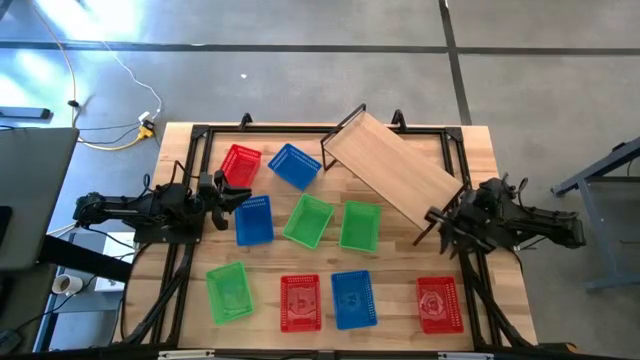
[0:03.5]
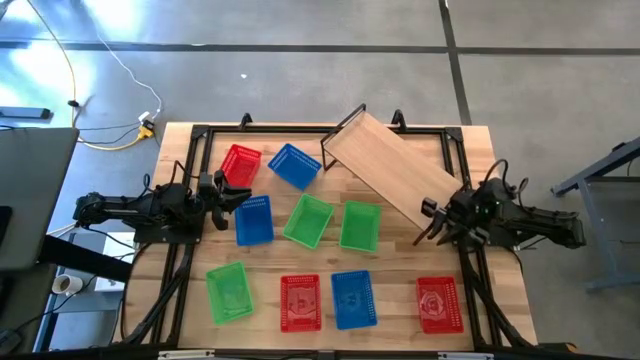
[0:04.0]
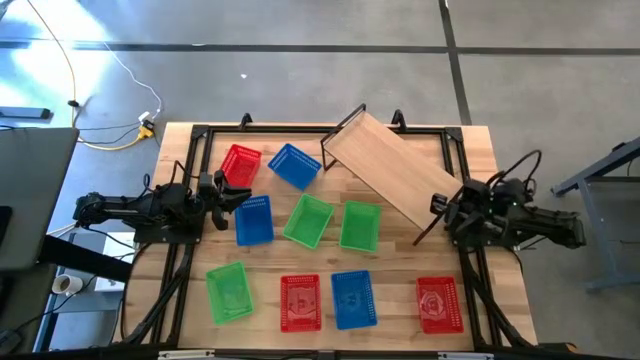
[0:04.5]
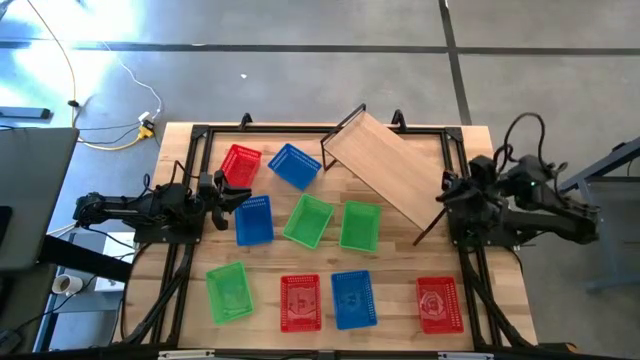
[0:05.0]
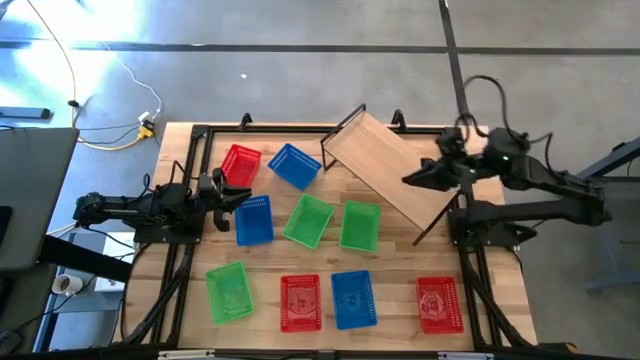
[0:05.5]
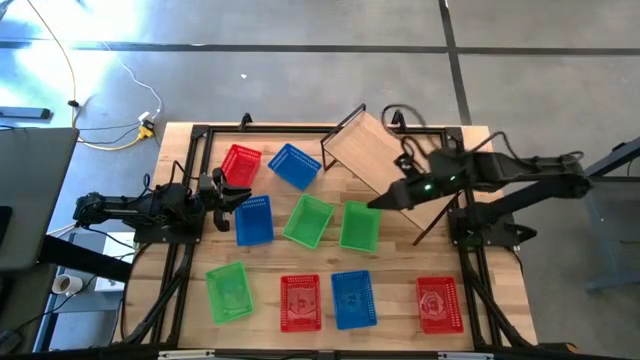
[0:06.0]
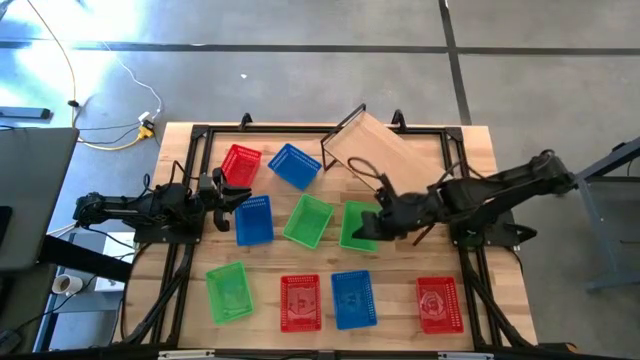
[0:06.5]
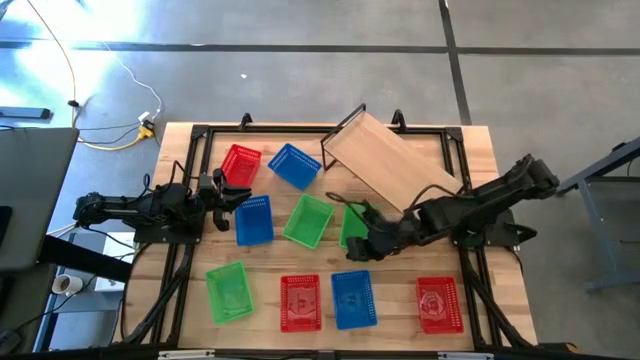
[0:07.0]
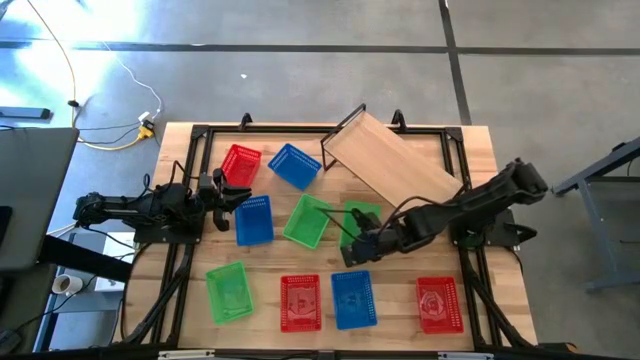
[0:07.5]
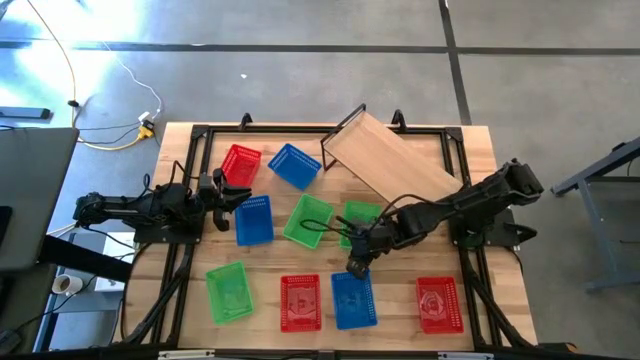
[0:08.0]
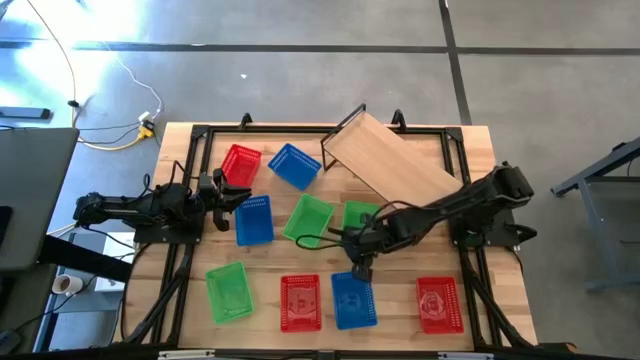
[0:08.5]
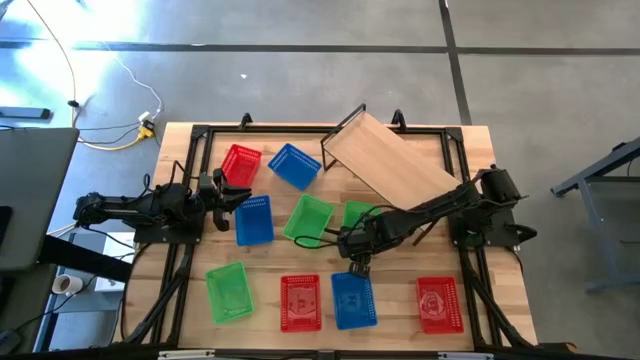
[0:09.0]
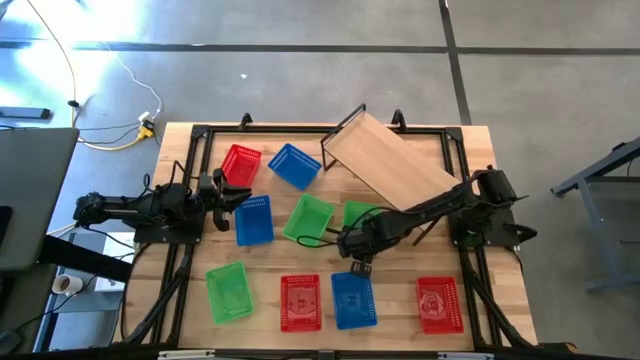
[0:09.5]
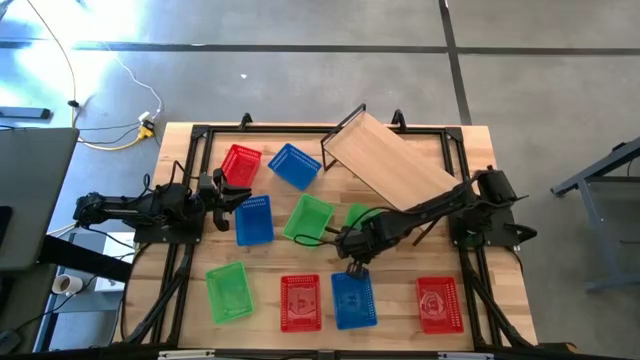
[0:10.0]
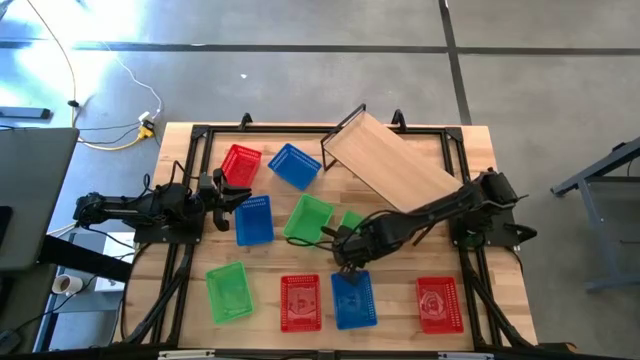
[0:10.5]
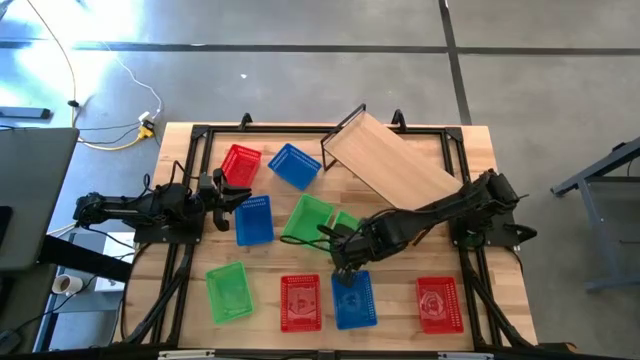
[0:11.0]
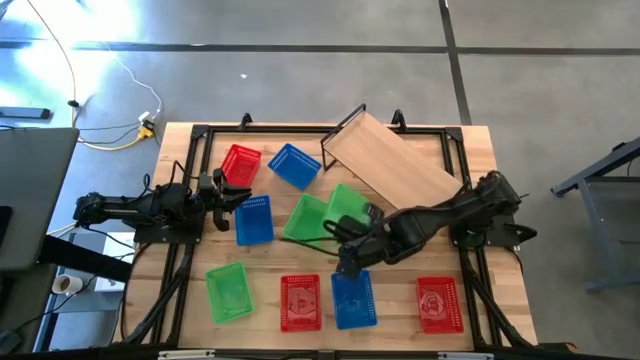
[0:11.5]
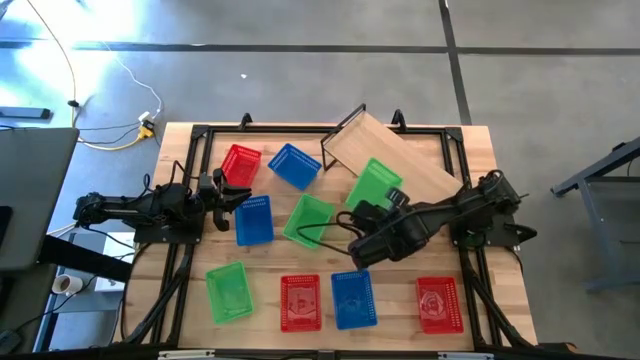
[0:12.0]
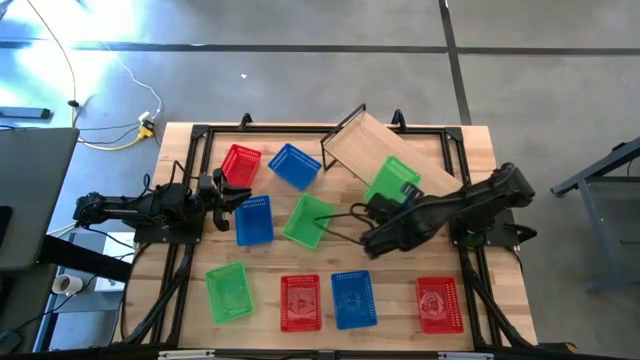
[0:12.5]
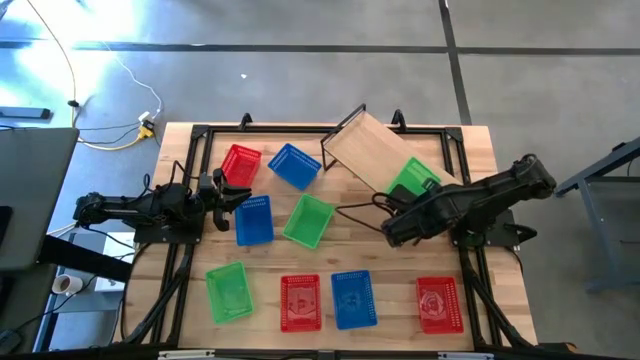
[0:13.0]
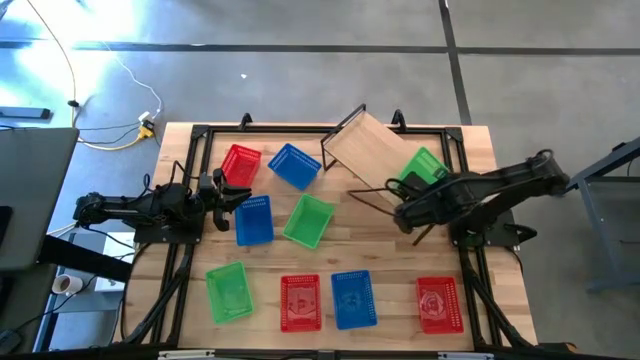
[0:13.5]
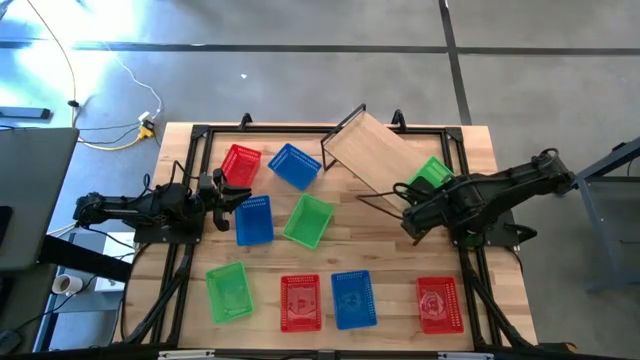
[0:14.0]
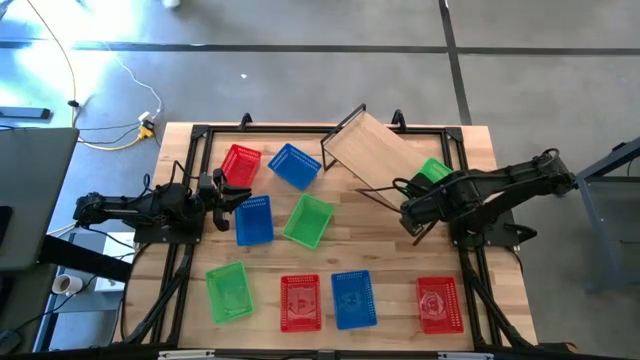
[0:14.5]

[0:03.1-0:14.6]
Task: Stack baskets on shelf by color
Put the right green basket on the shelf

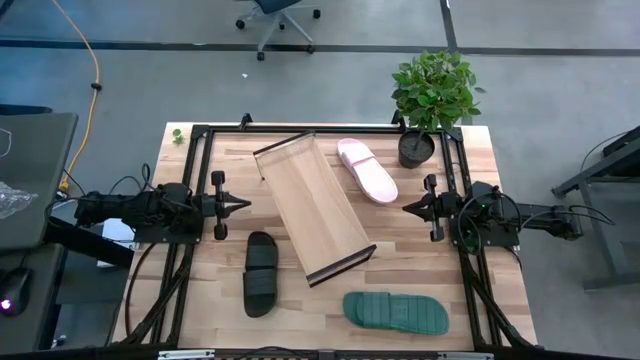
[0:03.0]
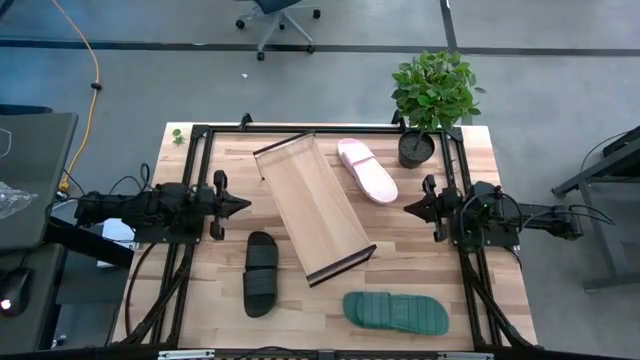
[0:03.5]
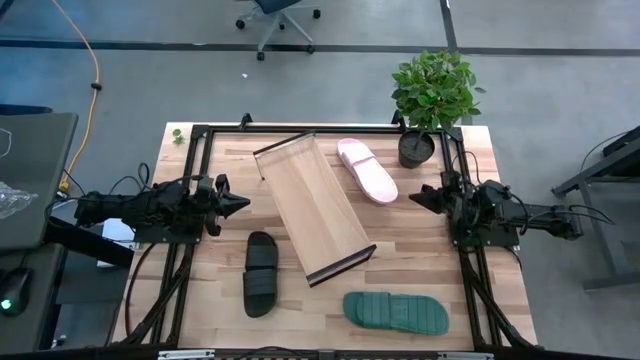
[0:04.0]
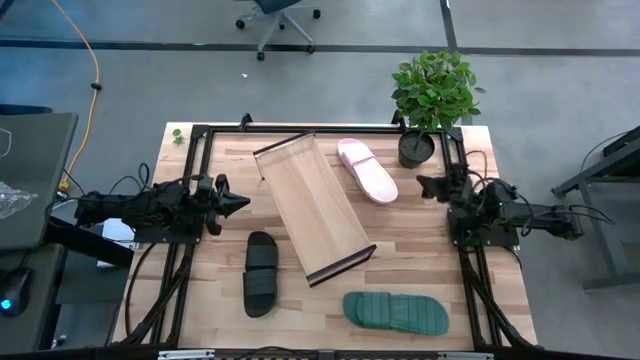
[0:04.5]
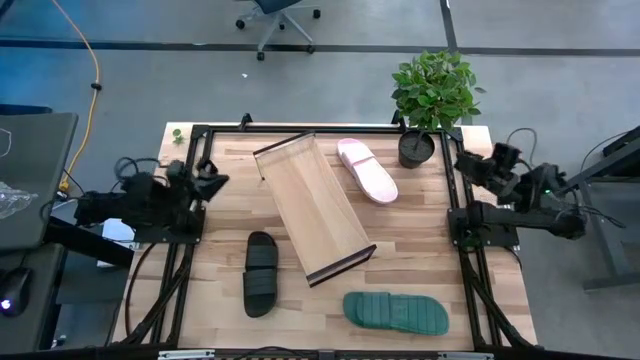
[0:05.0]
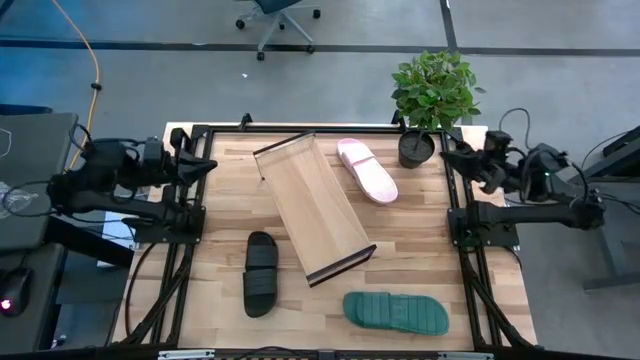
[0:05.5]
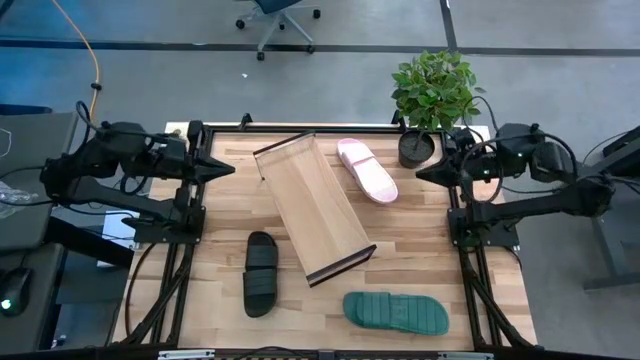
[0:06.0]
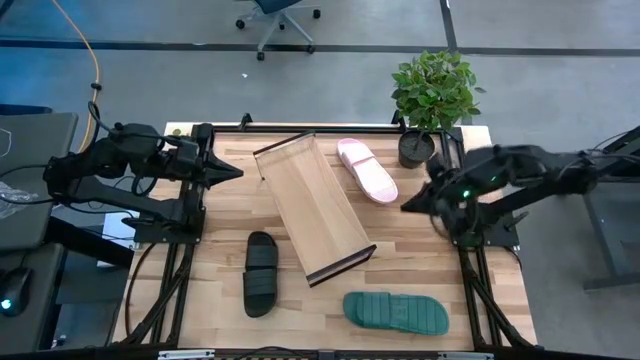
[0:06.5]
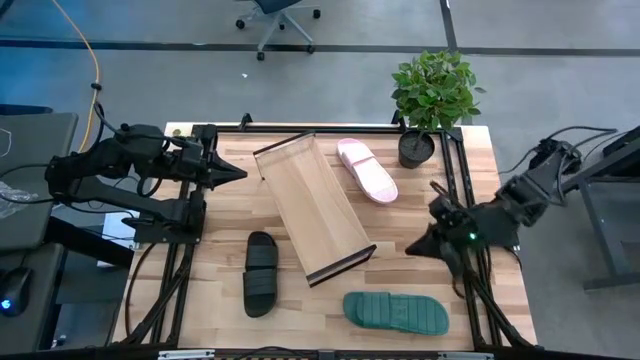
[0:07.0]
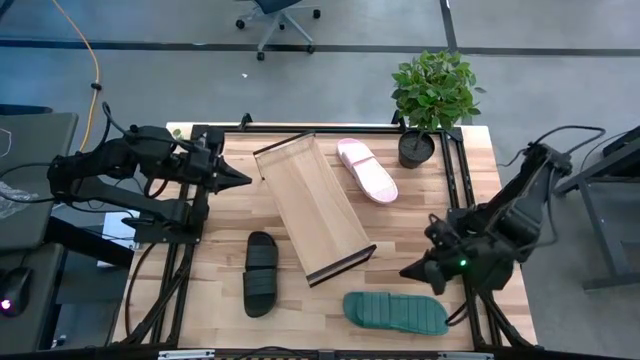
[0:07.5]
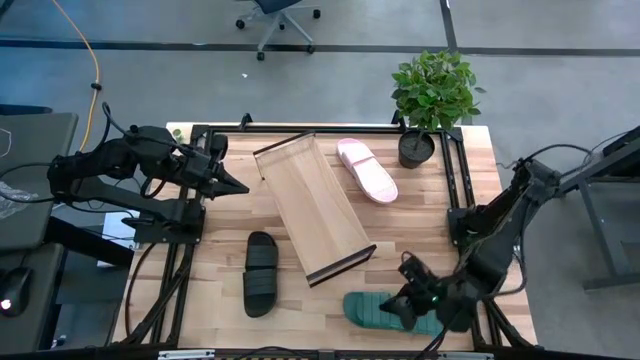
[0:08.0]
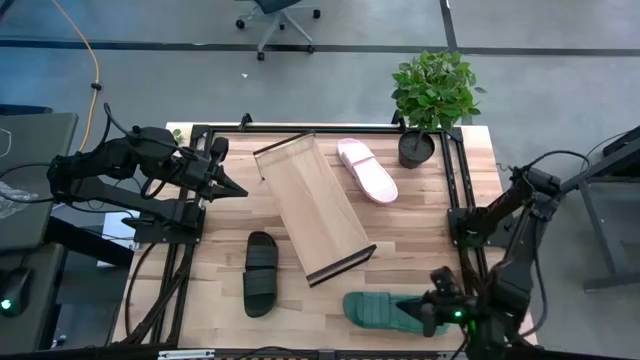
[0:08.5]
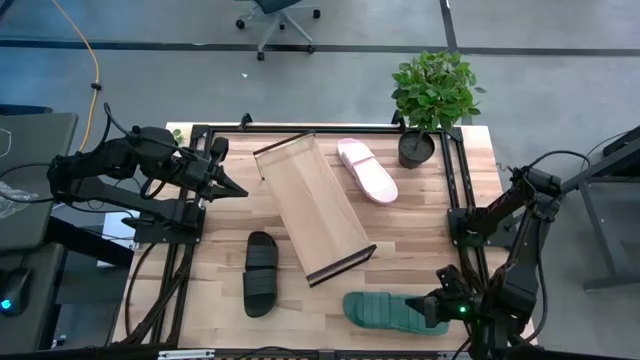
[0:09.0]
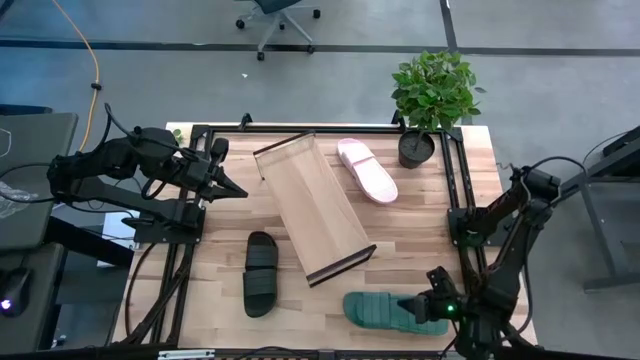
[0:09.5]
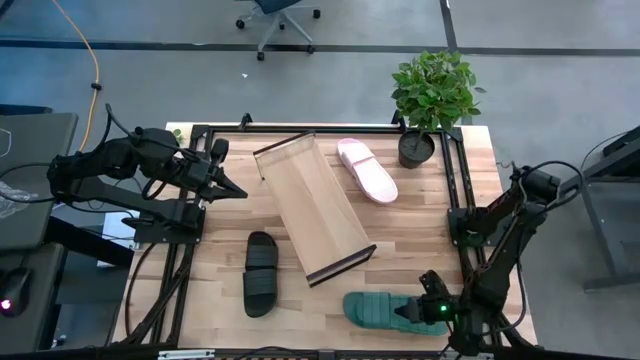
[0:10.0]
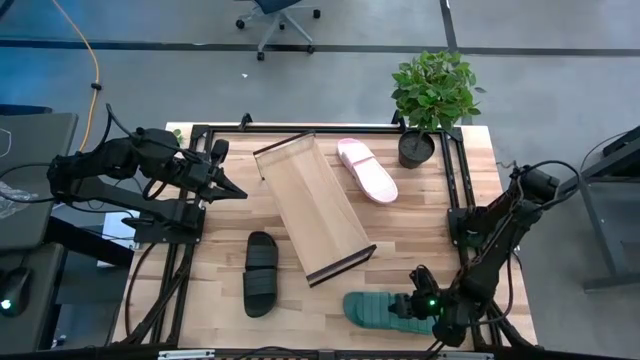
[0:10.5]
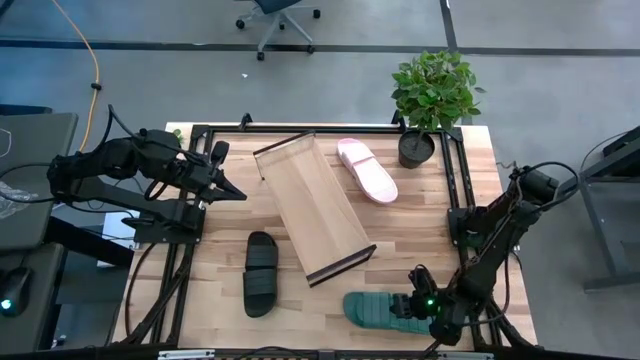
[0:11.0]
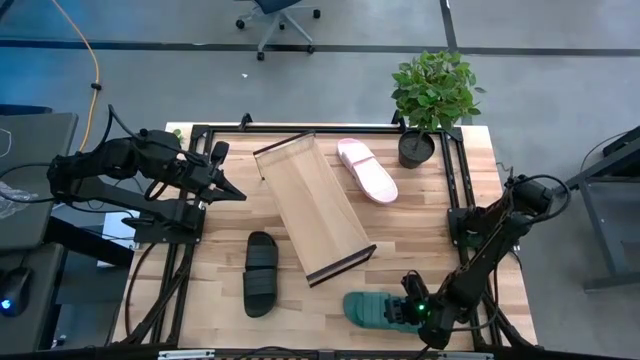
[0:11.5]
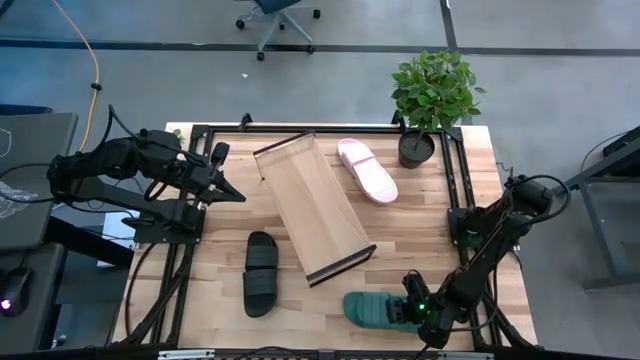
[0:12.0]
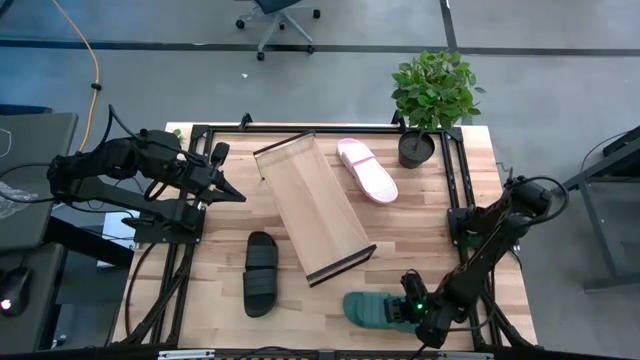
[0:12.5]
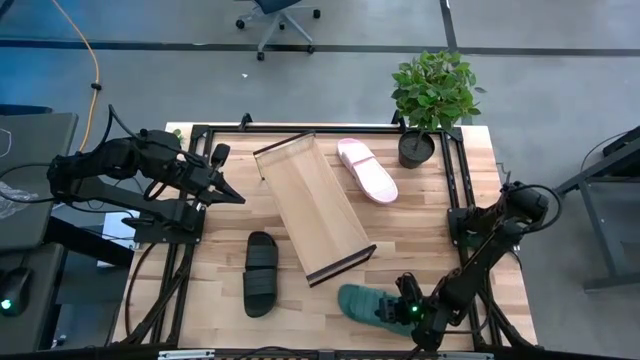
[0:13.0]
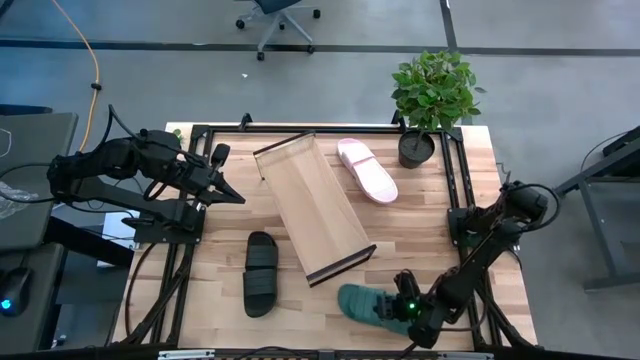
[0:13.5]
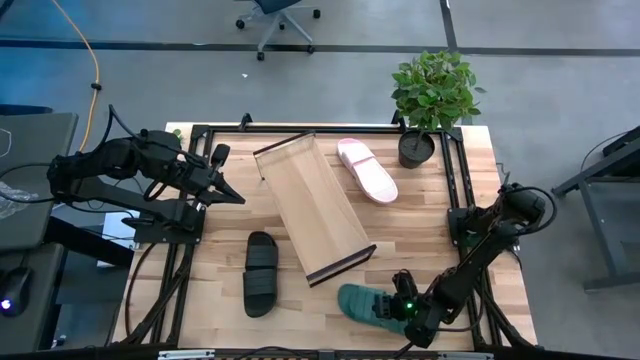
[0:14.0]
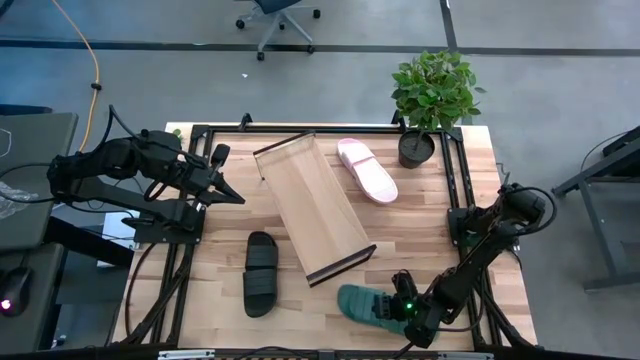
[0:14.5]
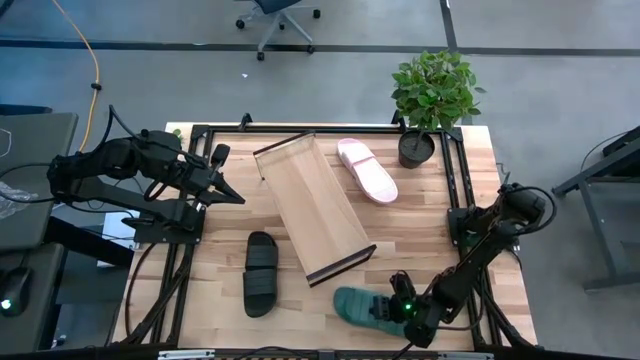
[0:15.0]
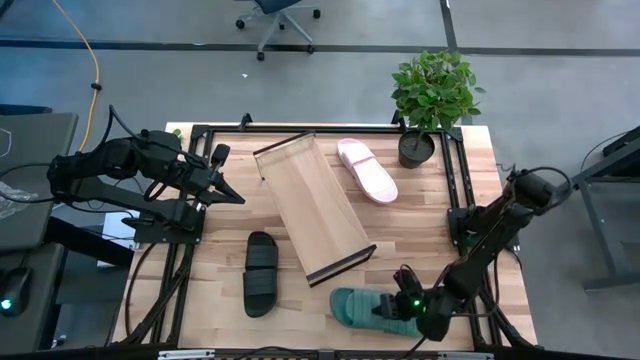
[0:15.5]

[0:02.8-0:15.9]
Task: Pick and place slides into the shelf
Put the blue pair of slides on the shelf
